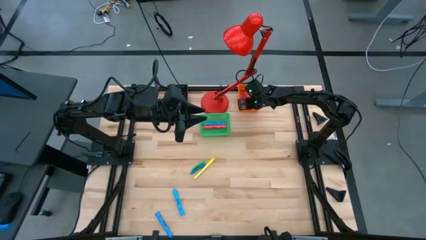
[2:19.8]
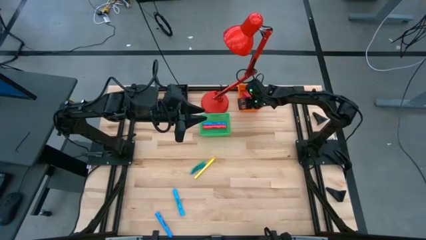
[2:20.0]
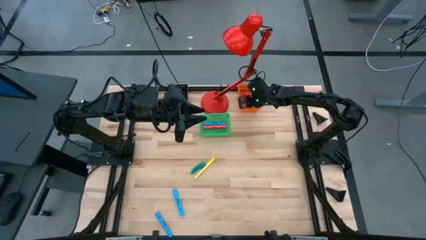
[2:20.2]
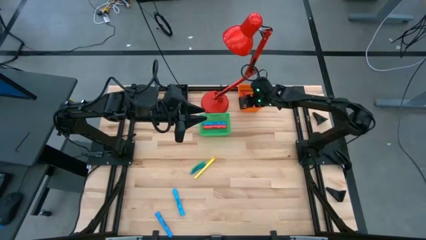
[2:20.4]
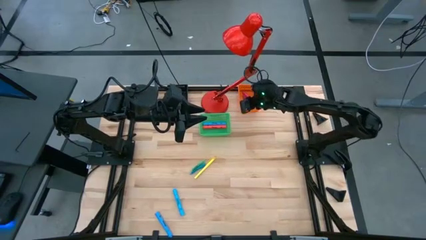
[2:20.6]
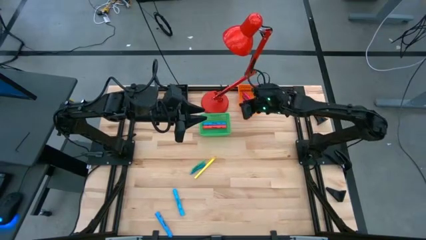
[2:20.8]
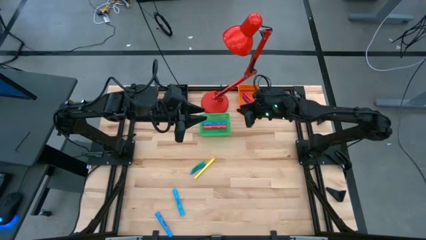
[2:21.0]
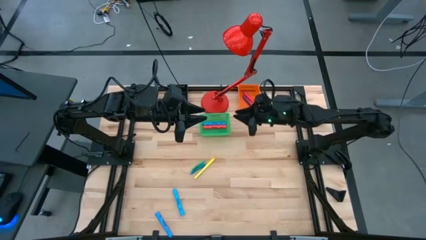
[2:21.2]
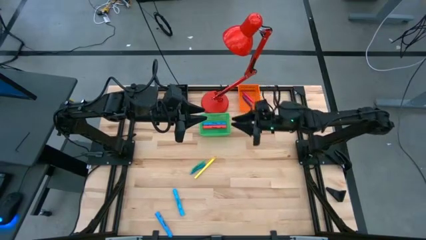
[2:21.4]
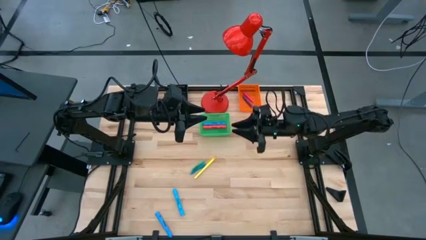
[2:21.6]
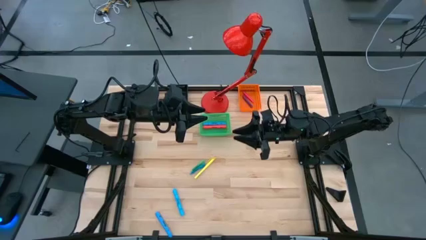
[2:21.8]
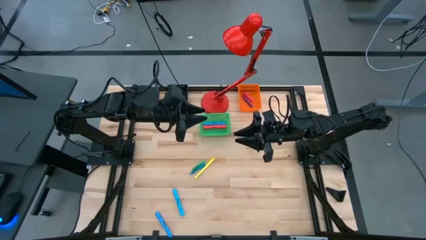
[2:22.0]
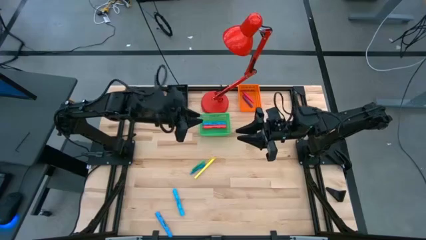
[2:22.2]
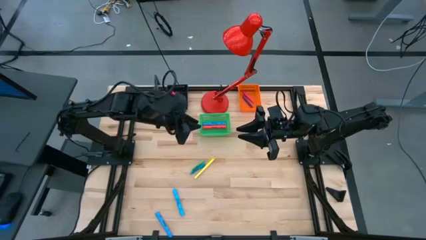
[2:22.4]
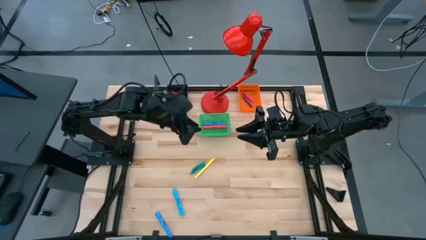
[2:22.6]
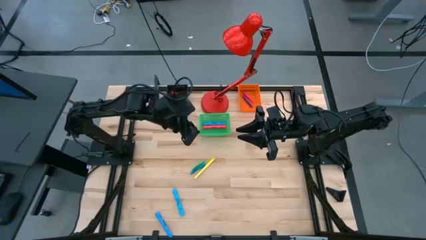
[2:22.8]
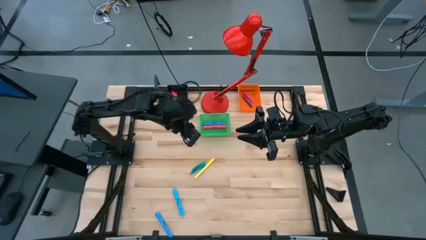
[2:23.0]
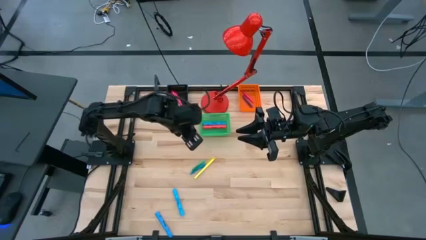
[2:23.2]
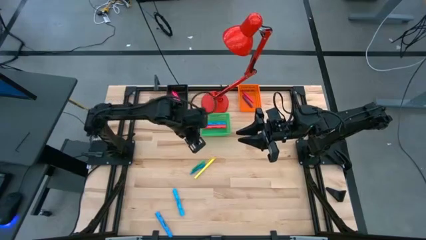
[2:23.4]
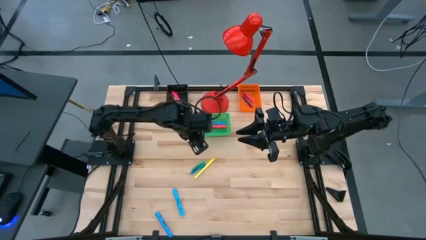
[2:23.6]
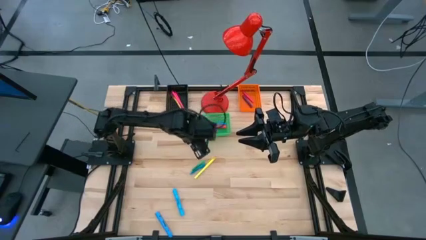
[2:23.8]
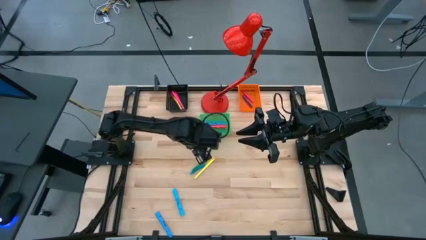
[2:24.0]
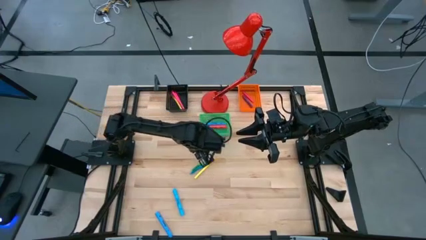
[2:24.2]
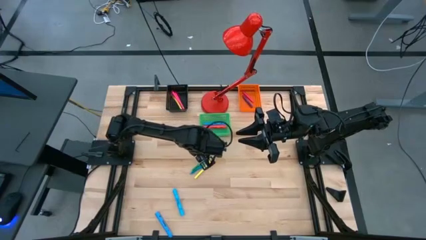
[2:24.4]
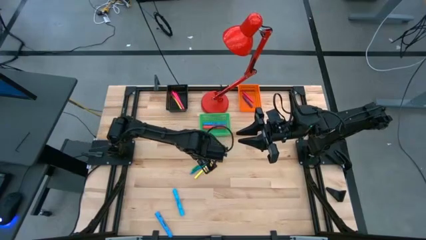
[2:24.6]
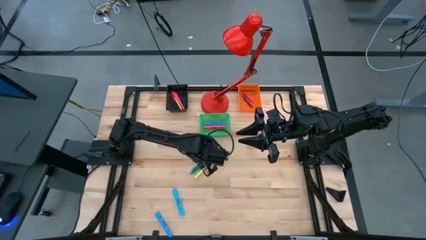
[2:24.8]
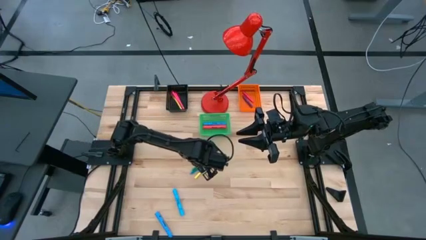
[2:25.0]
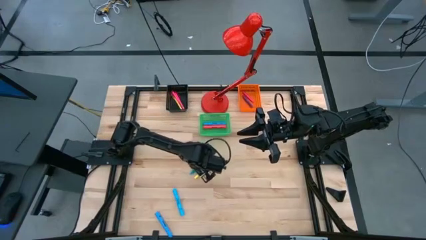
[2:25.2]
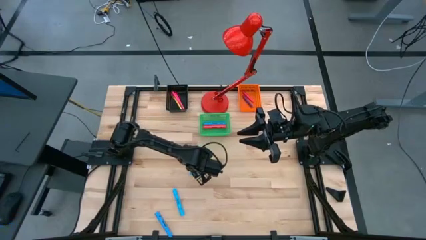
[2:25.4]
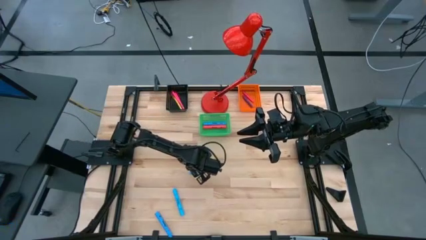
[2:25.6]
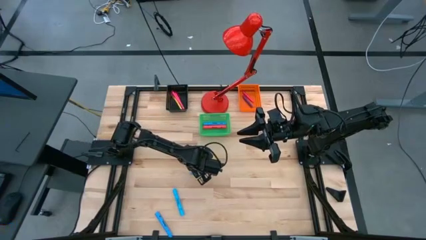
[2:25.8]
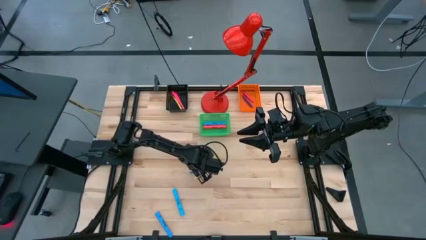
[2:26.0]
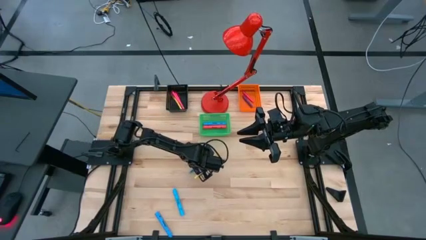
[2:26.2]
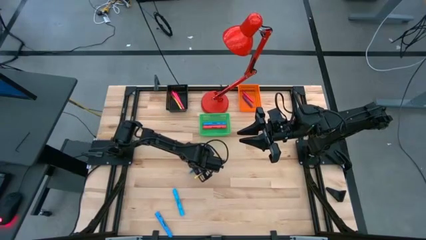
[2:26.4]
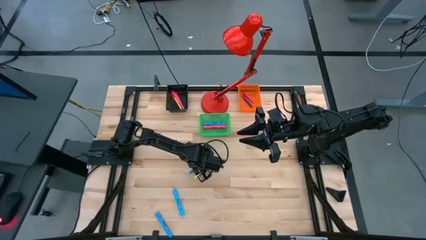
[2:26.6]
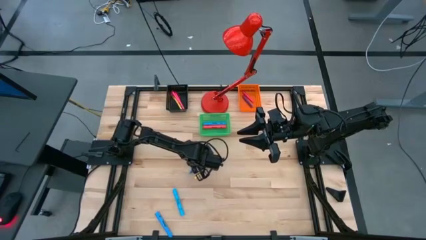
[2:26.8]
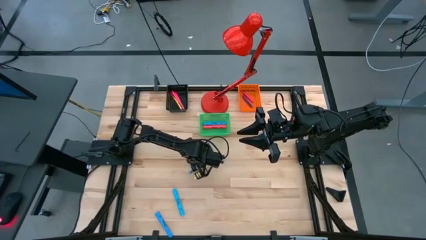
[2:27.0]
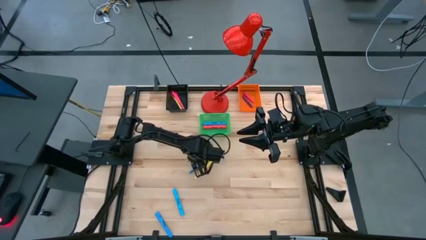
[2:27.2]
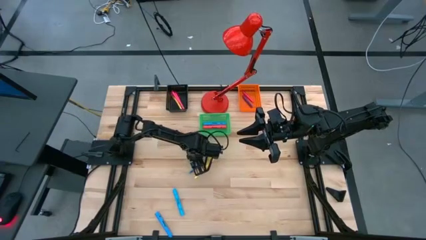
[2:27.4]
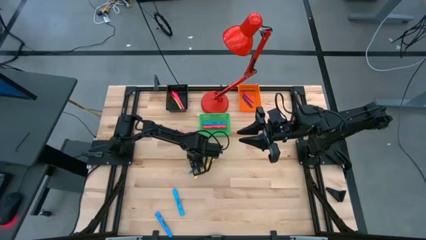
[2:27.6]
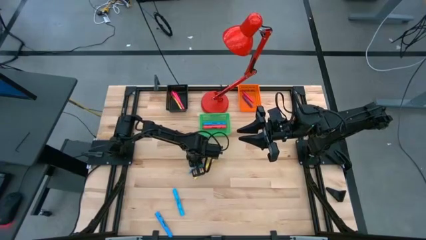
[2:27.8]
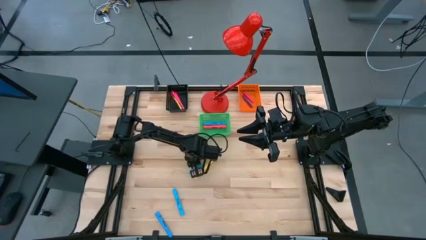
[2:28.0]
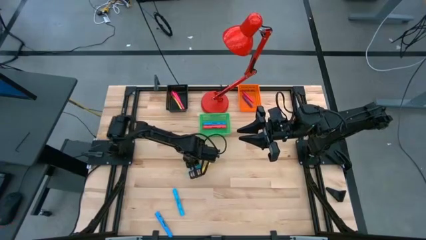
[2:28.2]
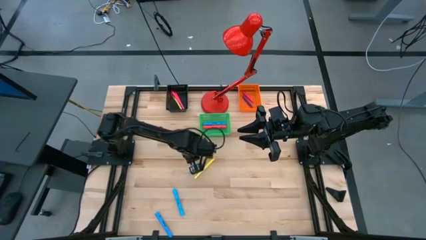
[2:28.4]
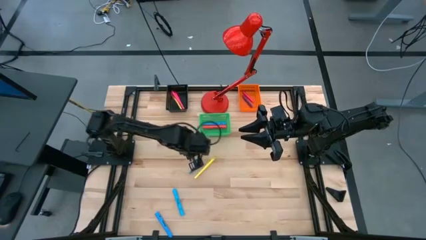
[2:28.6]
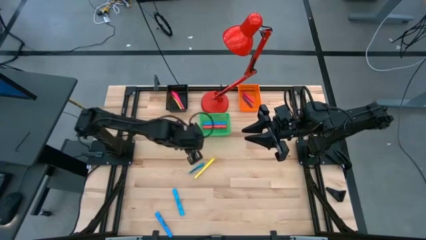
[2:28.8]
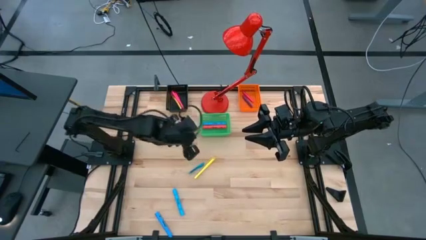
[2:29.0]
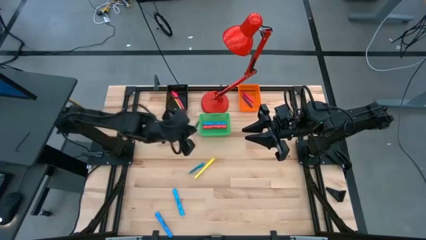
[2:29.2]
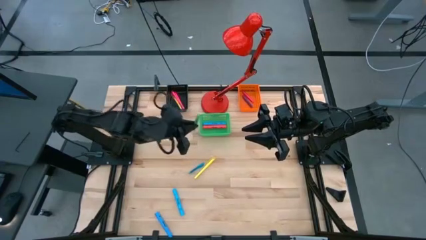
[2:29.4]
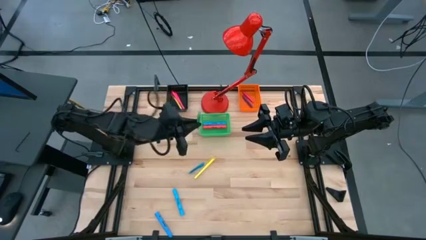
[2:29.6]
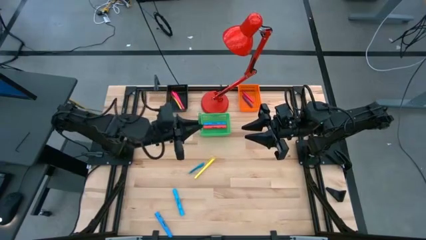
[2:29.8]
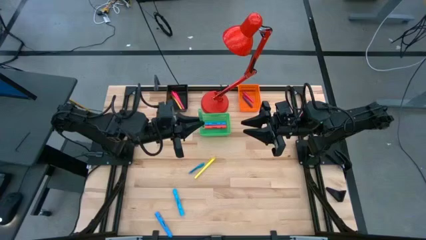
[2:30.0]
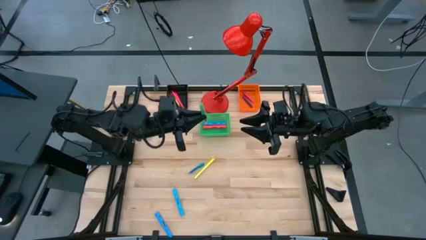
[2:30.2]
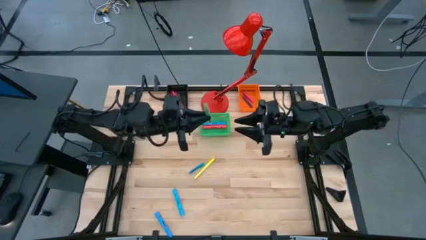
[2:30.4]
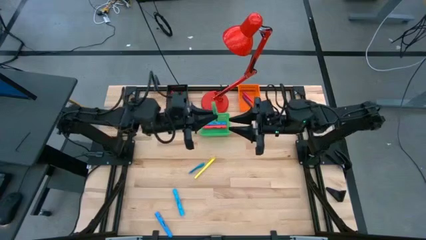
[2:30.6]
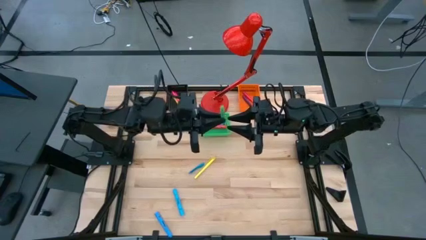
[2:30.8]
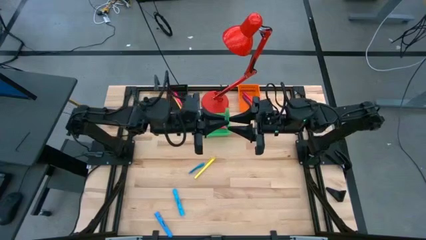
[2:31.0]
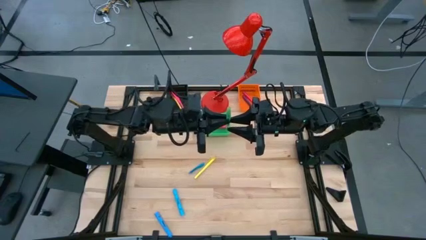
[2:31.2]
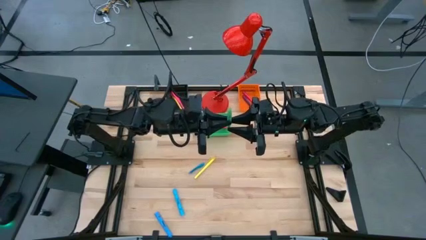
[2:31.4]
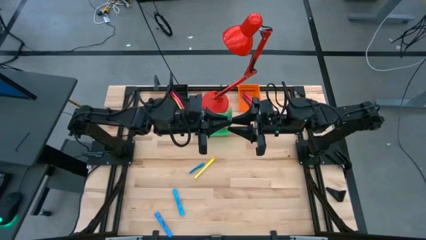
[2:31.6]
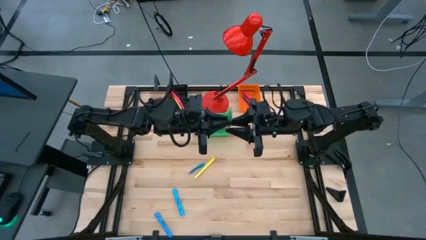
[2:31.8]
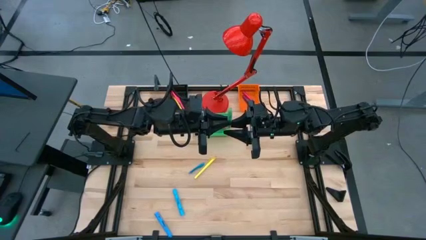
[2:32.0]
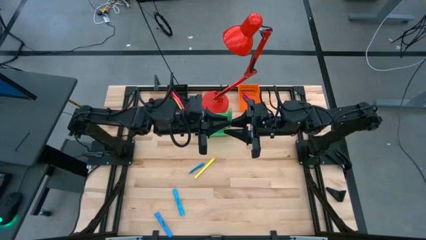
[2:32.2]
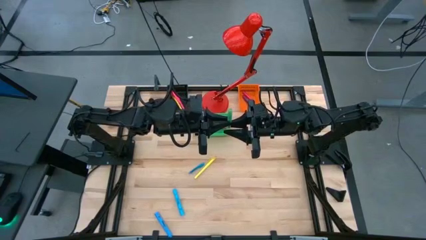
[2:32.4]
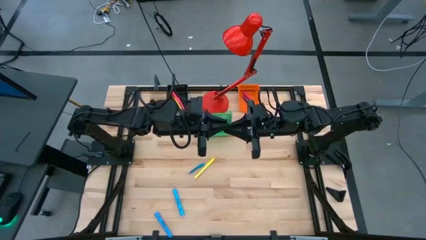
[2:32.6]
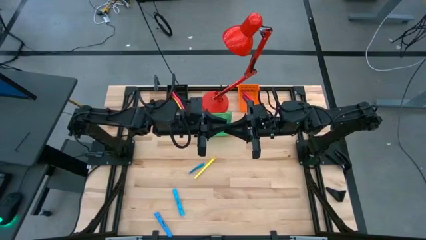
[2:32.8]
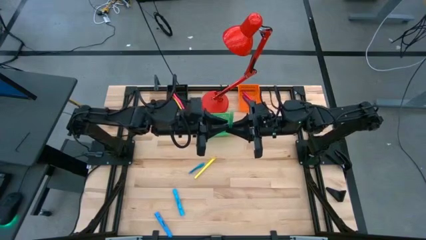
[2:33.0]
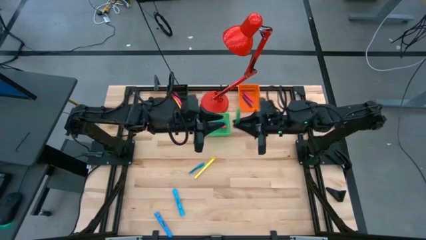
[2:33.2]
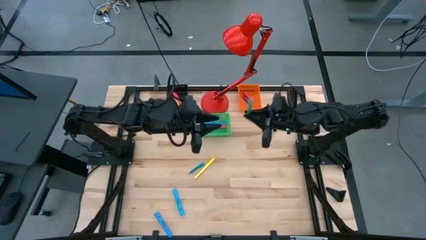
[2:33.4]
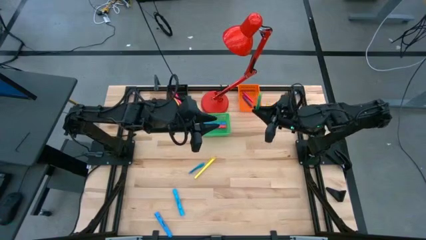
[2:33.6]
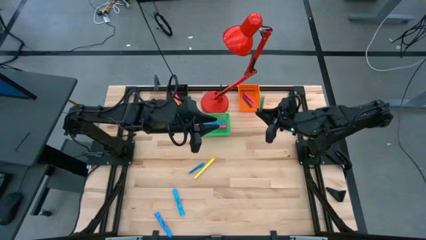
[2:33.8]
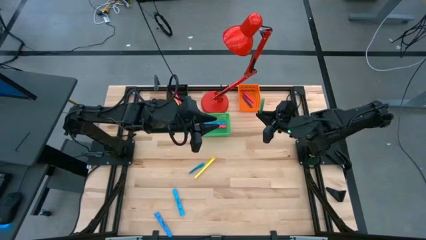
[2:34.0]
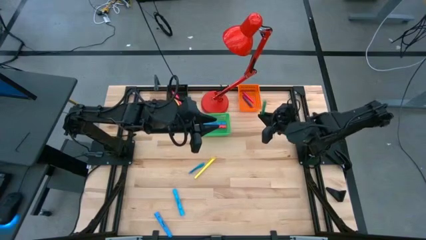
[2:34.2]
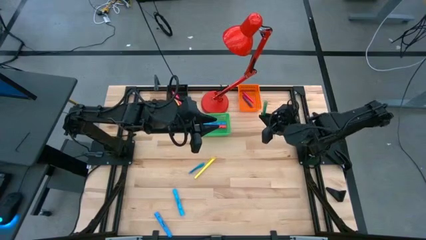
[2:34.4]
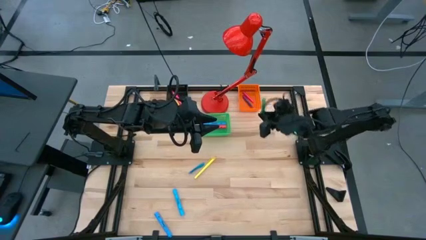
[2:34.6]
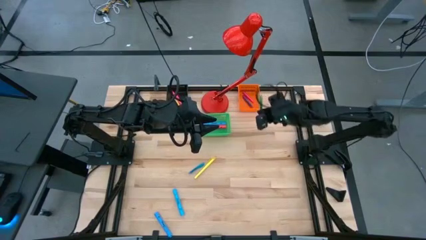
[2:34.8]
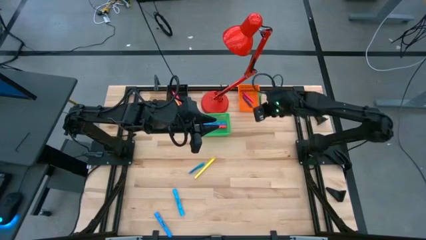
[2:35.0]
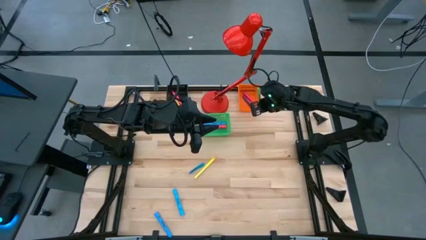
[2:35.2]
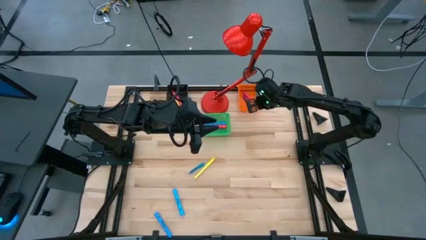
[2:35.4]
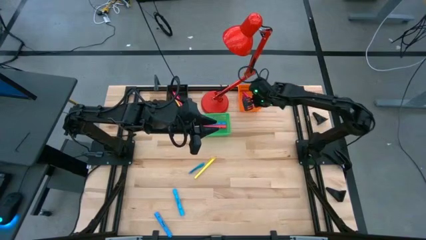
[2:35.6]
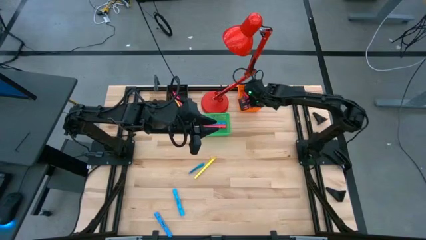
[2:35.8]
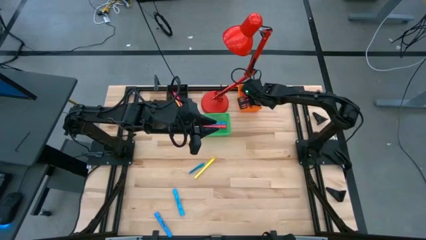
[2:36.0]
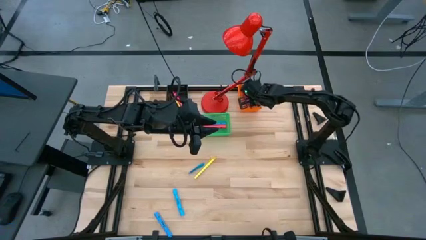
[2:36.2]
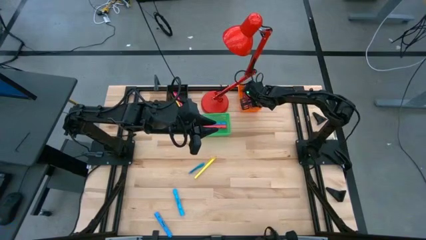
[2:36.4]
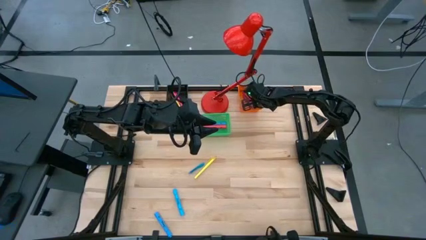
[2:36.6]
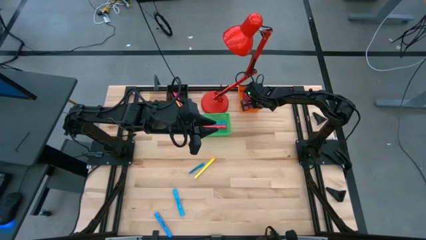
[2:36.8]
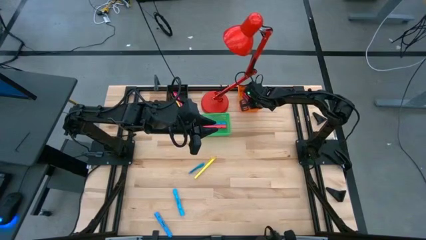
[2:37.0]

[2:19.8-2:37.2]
Task: Pick & Place Markers
Put the small green highlighter into the orange basket
